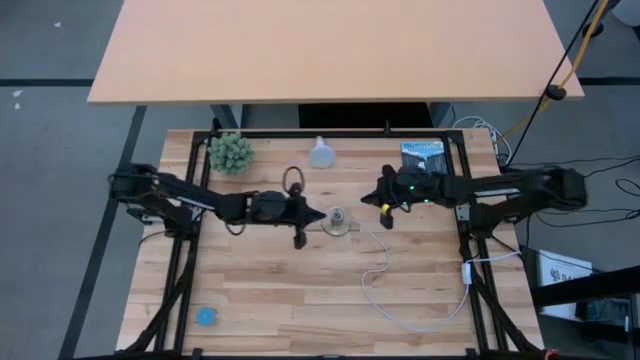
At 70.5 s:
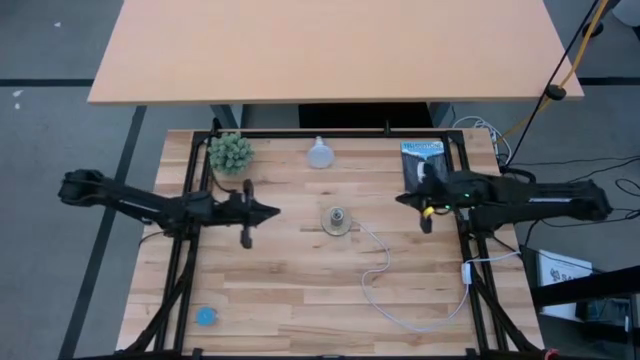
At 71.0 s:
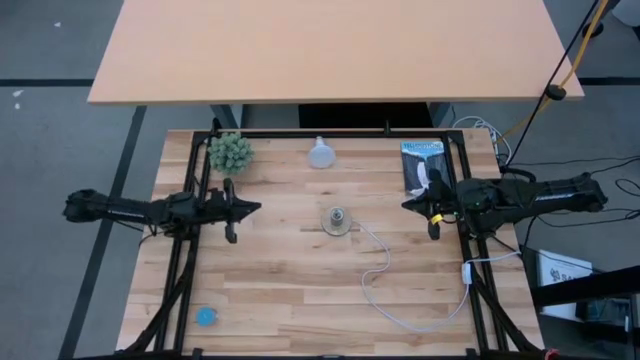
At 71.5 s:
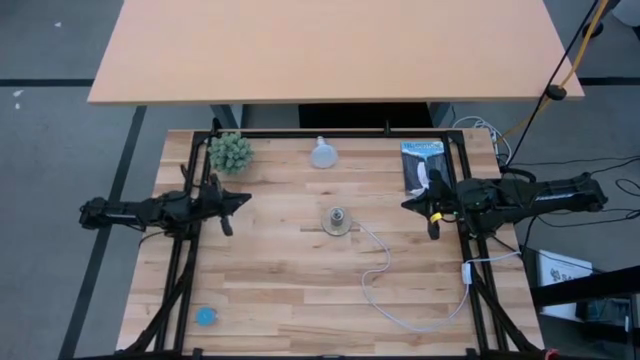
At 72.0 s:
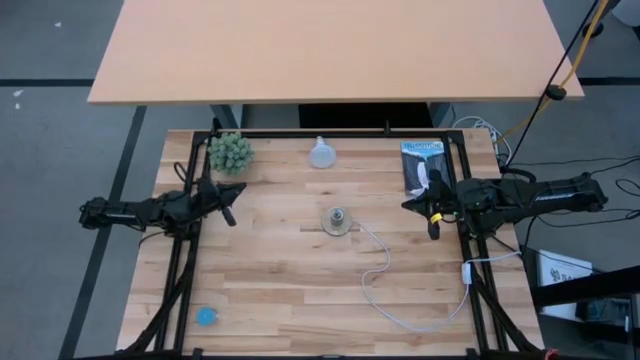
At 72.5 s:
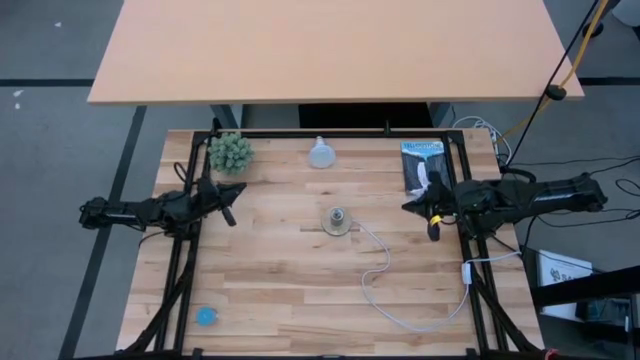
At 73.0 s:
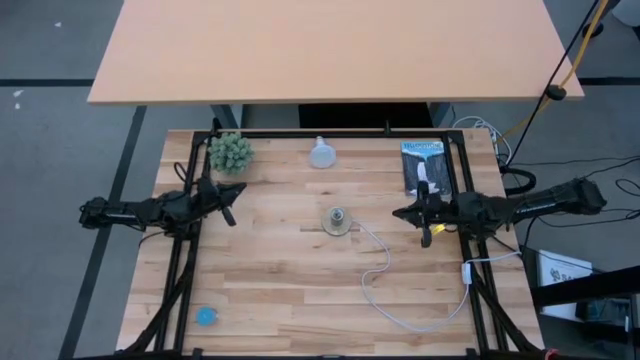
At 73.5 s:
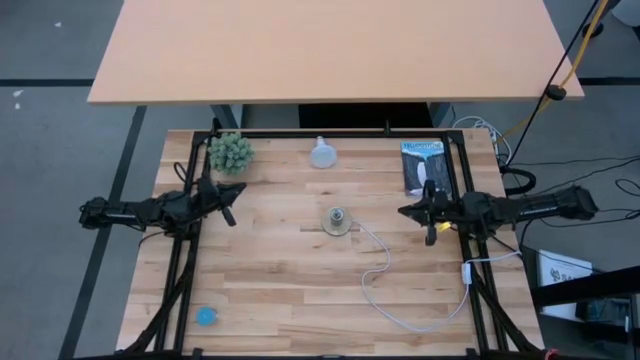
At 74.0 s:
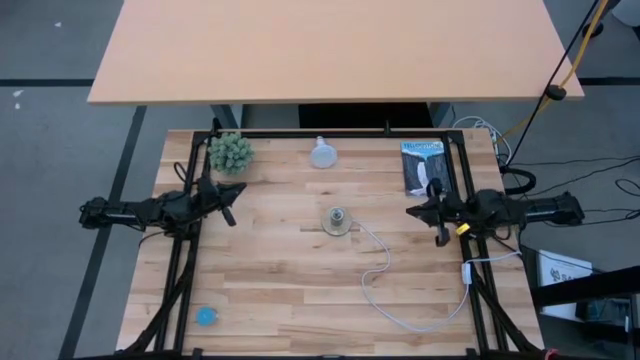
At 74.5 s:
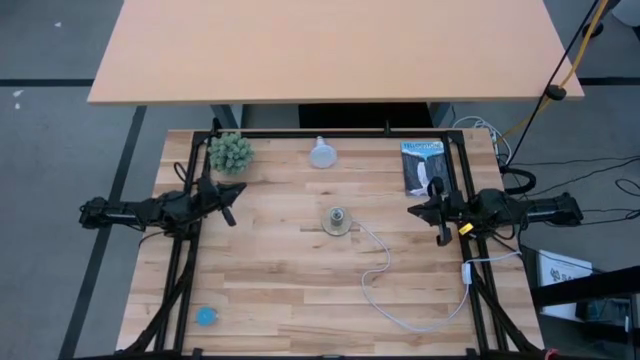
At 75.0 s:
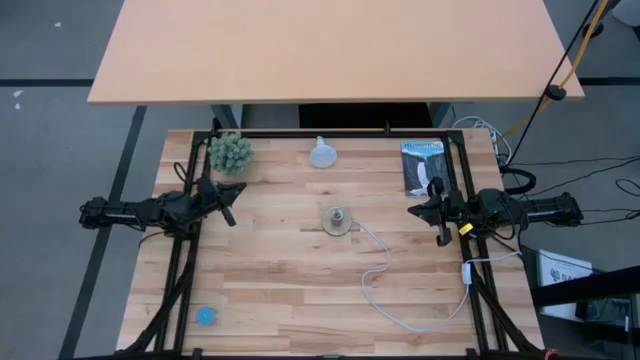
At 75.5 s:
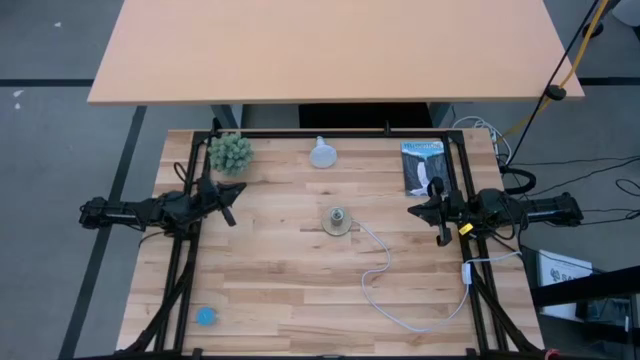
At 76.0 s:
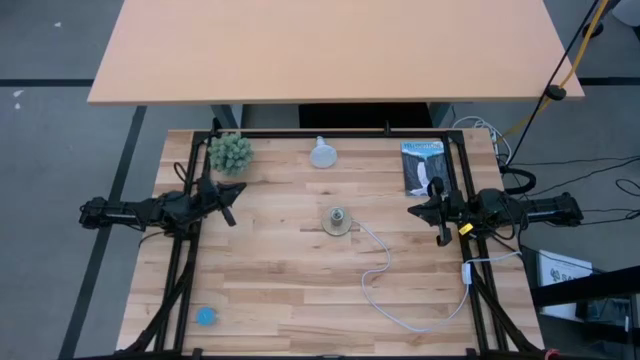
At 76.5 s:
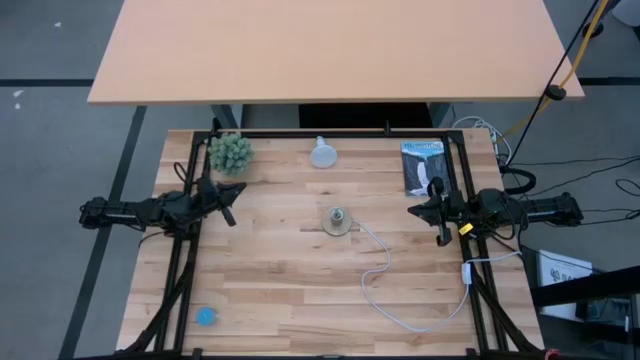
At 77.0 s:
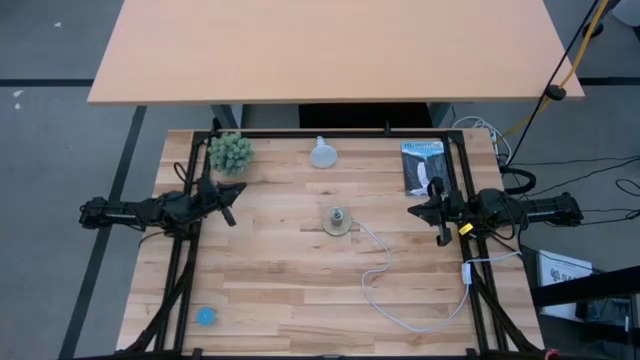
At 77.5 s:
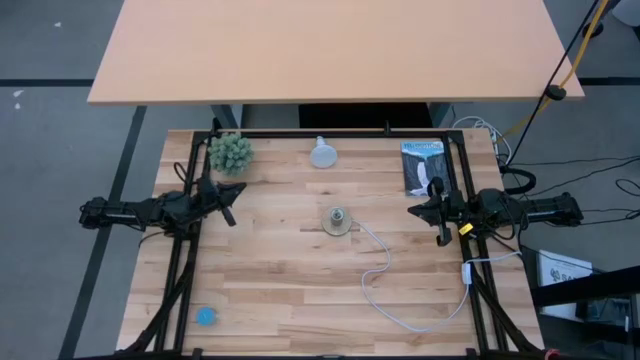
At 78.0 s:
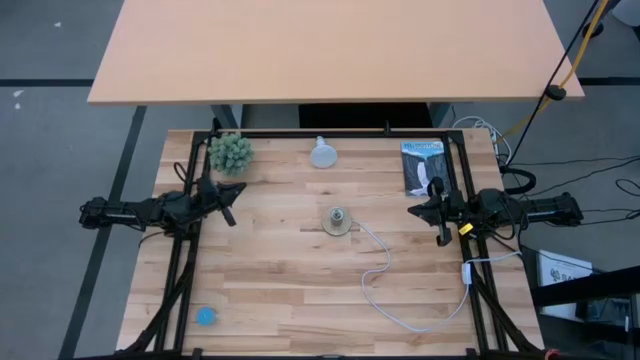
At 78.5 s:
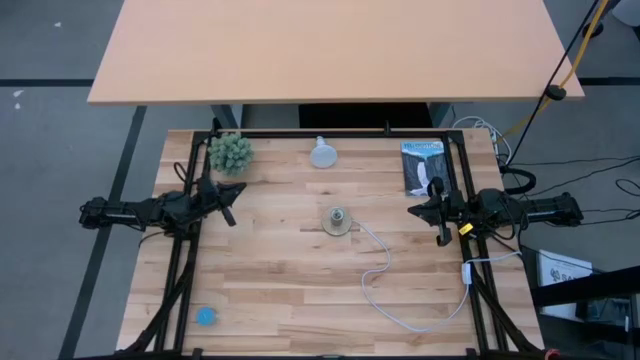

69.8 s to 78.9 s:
Task: Screw lightbulb
Return to Home Position

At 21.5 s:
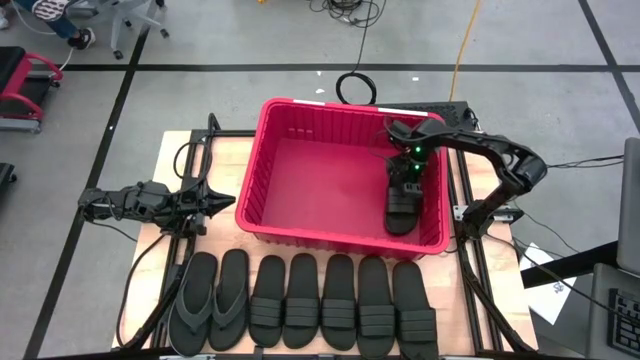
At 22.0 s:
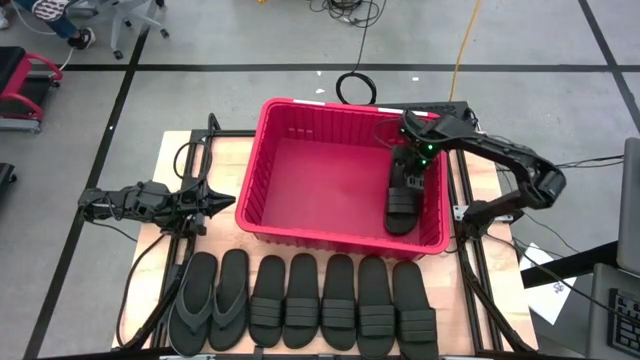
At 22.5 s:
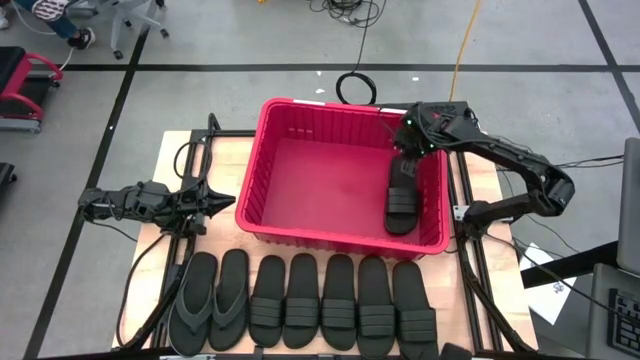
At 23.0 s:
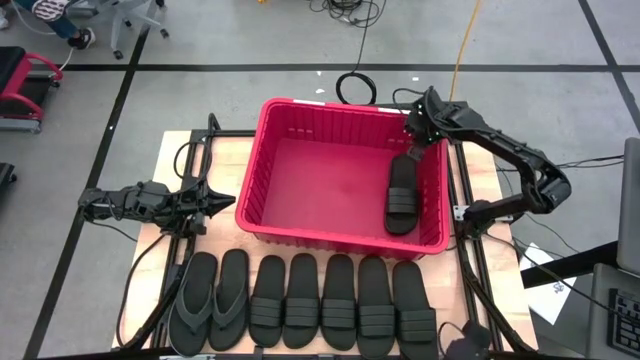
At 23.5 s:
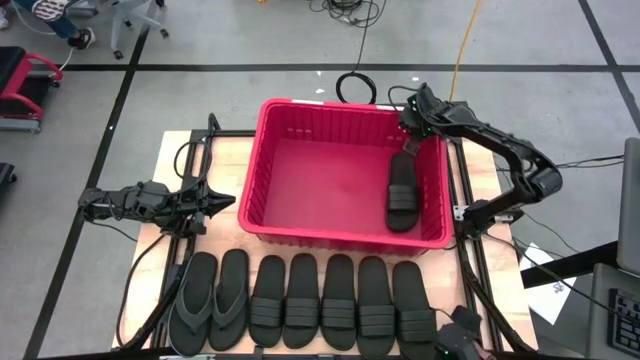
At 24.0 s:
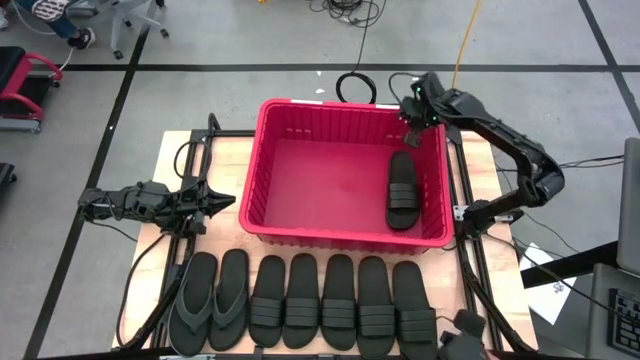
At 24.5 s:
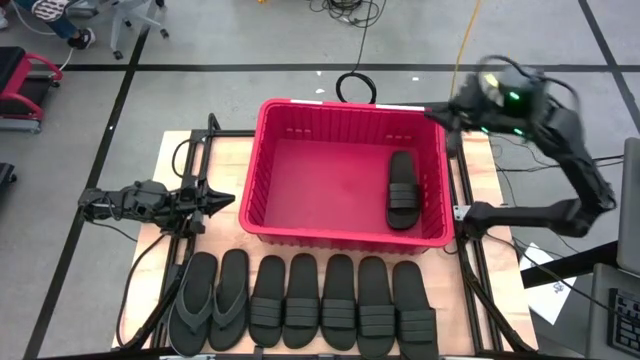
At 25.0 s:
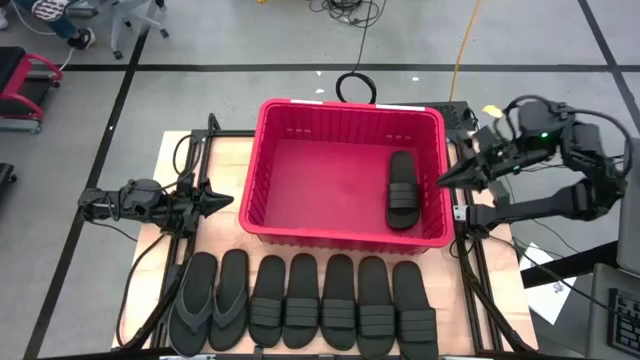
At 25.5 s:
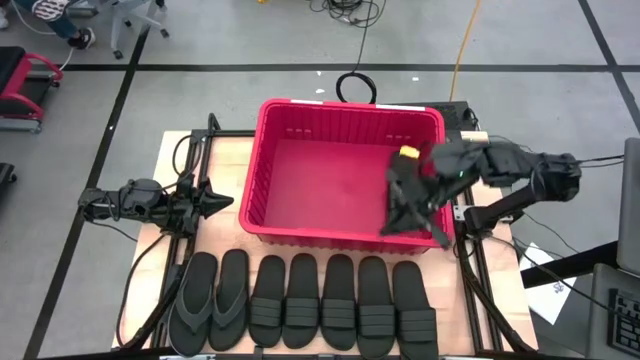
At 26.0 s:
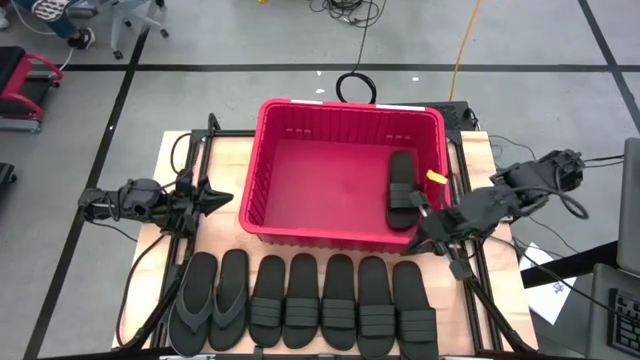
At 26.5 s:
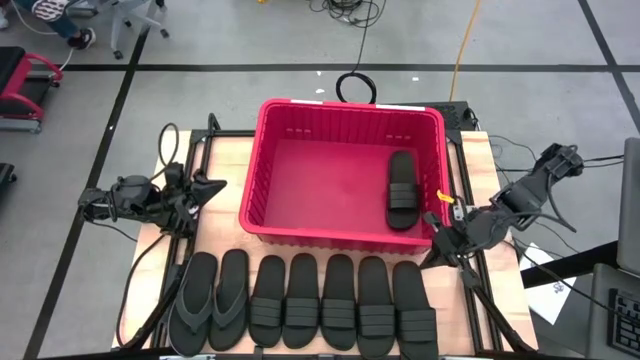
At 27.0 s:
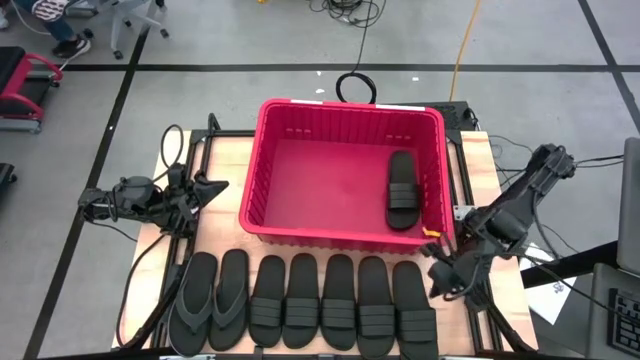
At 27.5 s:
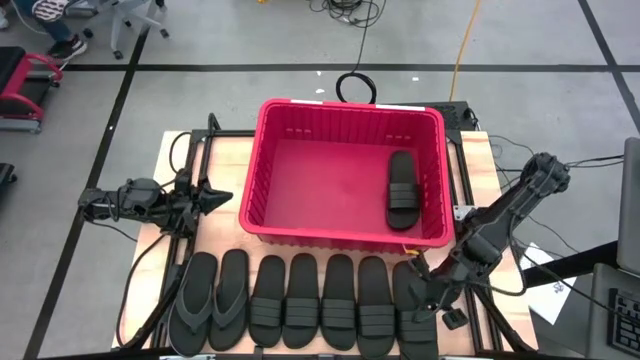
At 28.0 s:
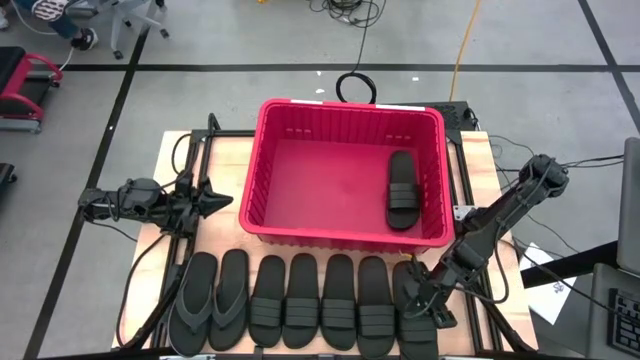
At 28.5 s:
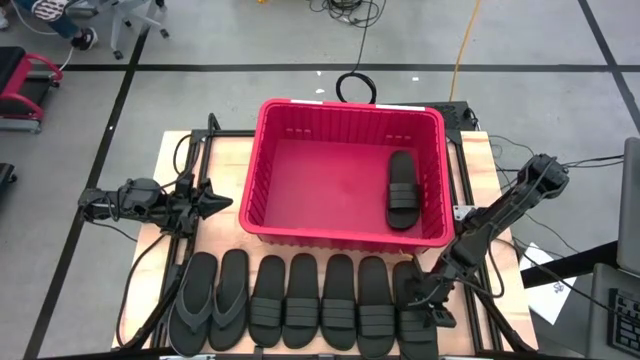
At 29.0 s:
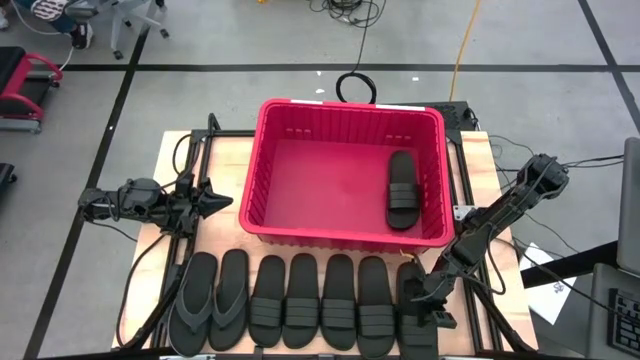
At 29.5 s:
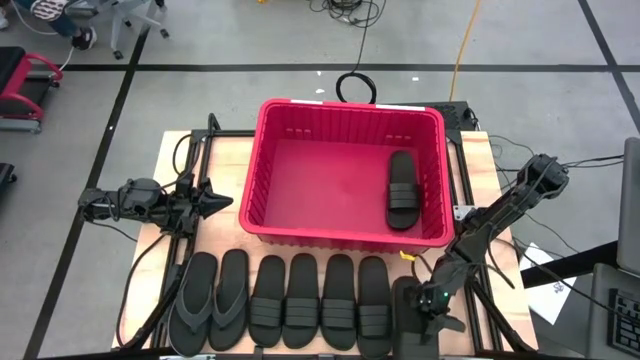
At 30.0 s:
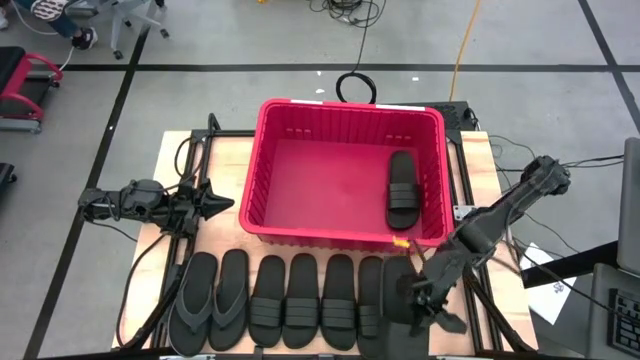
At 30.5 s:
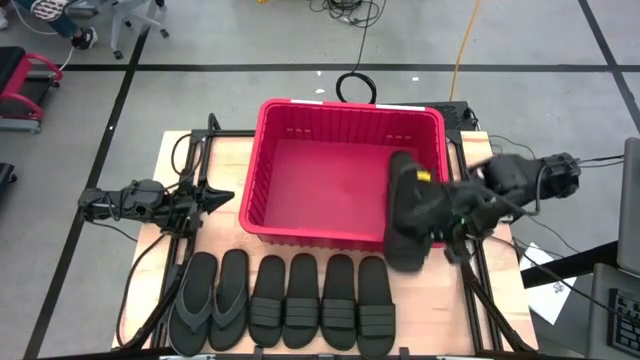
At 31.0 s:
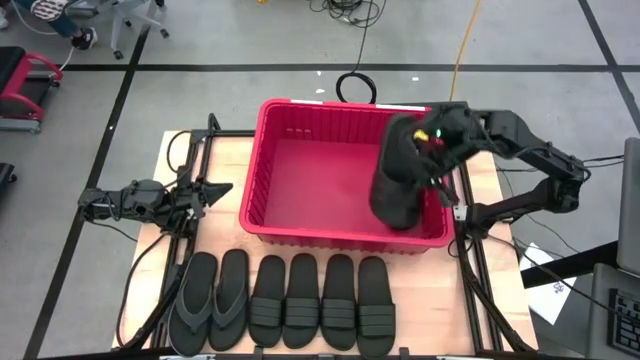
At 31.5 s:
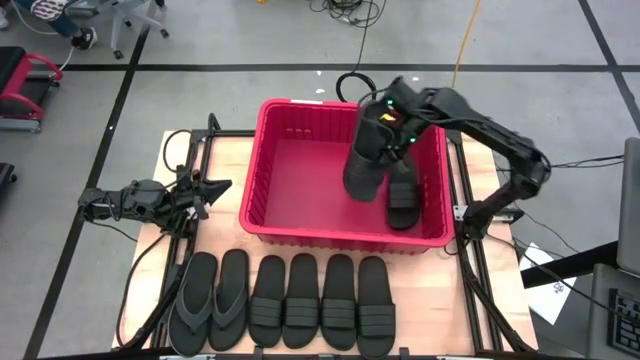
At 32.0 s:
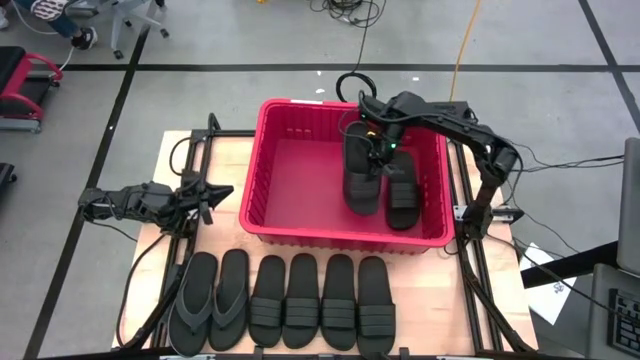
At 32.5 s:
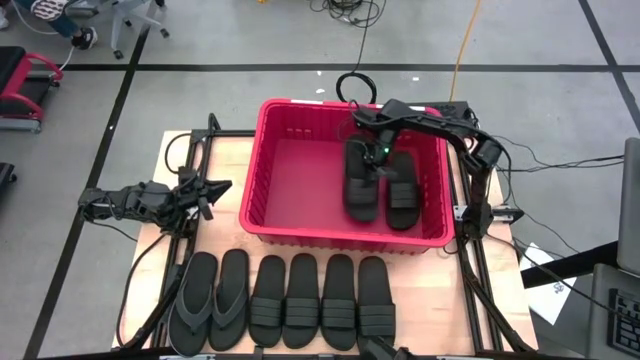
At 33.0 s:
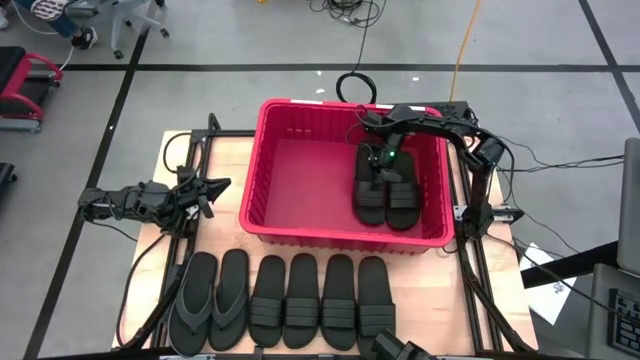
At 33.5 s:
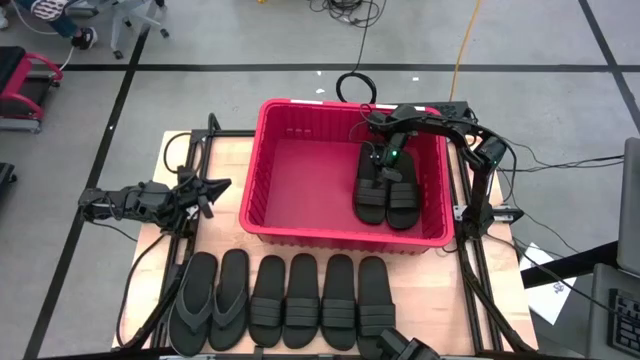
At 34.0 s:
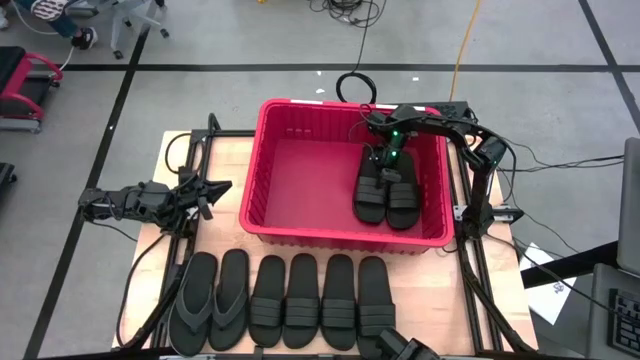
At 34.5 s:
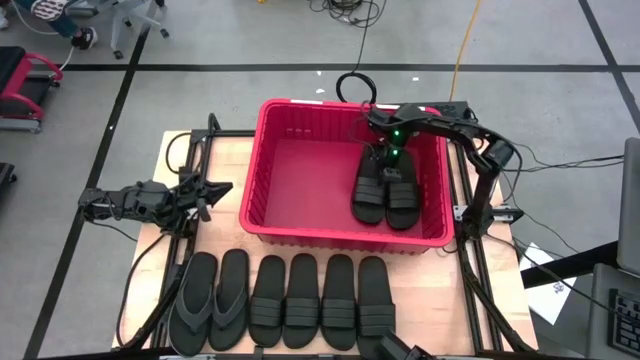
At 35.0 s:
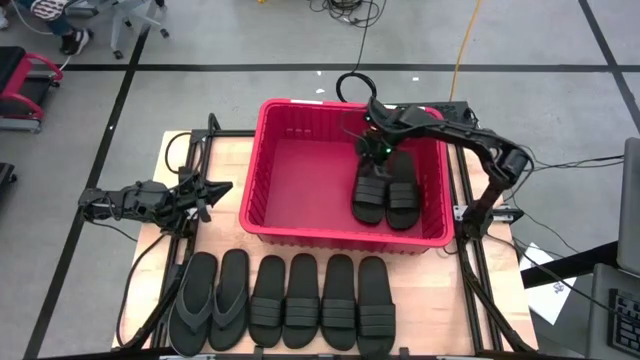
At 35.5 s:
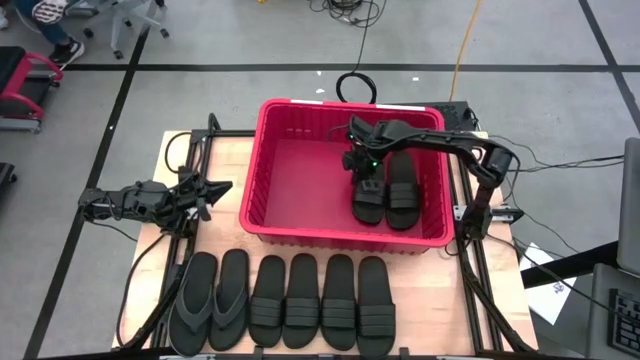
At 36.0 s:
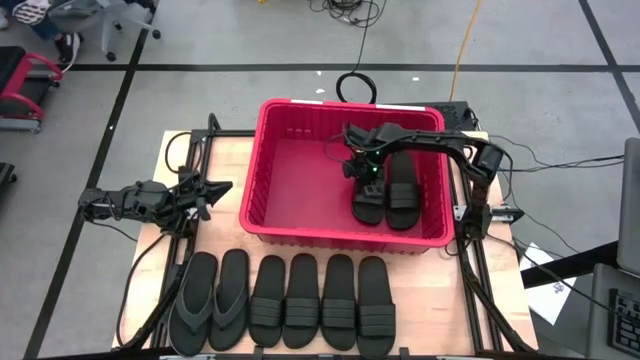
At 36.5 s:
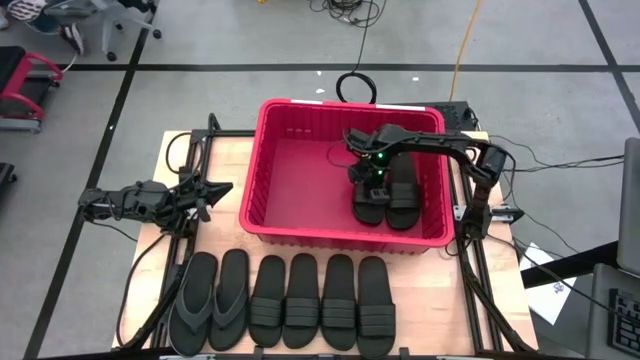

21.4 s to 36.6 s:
Task: Pick and place slides into bin
Put the black slide into the red bin
